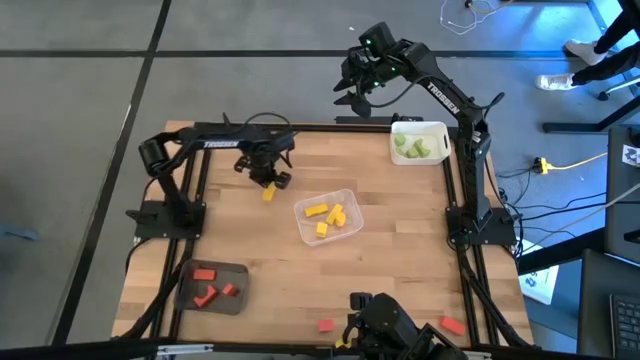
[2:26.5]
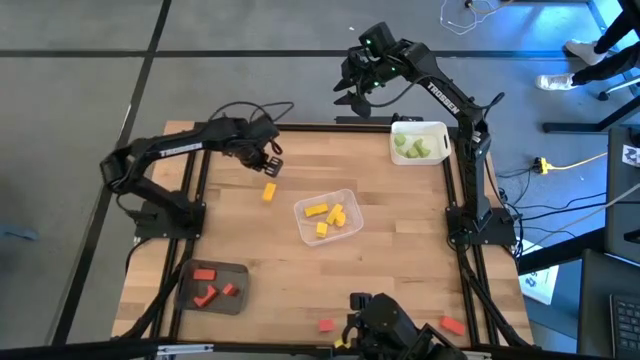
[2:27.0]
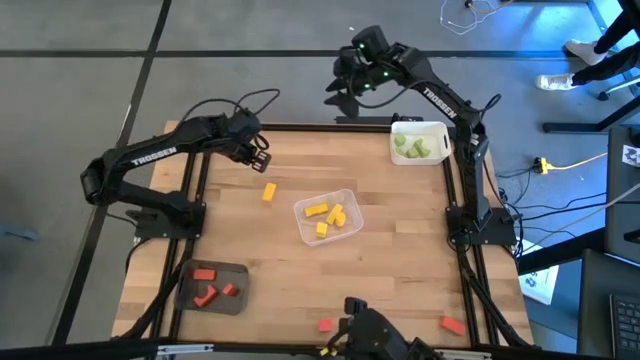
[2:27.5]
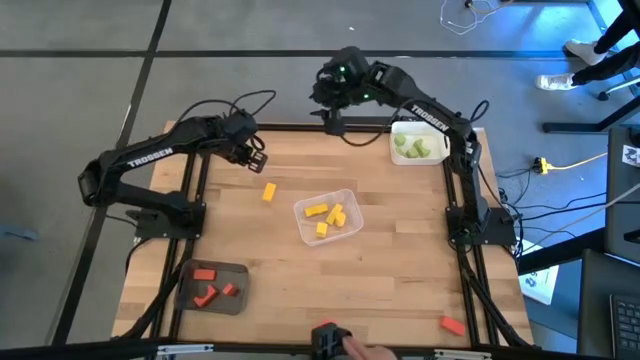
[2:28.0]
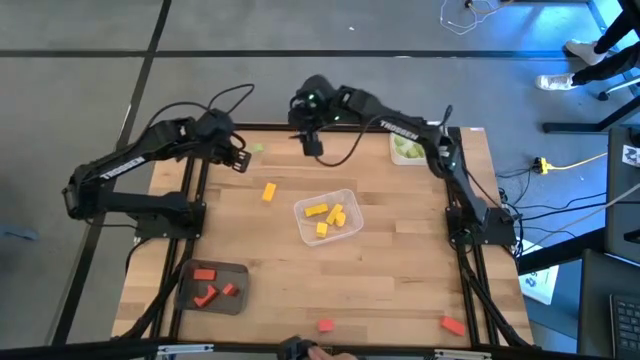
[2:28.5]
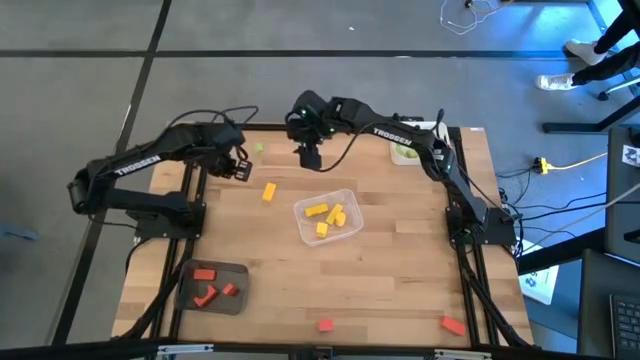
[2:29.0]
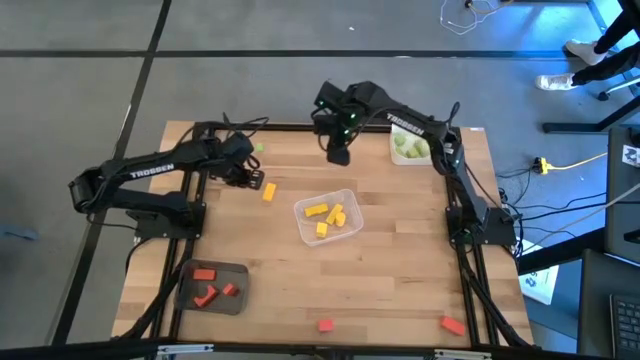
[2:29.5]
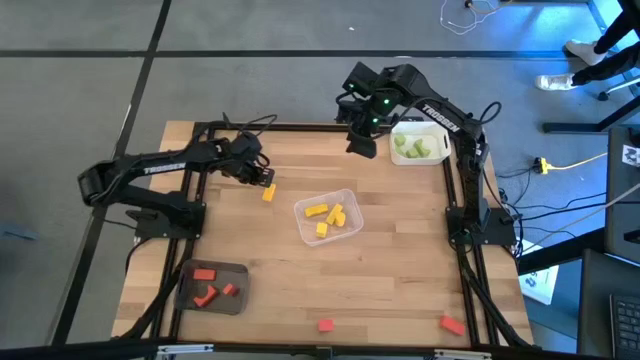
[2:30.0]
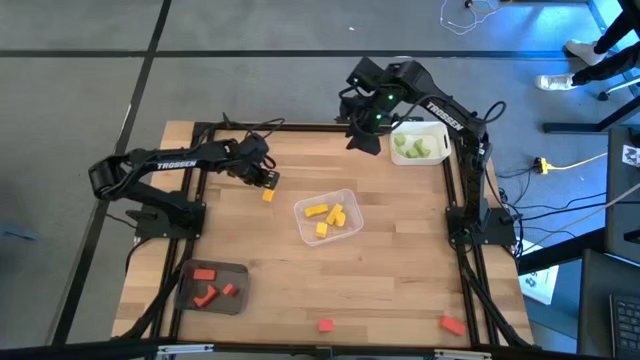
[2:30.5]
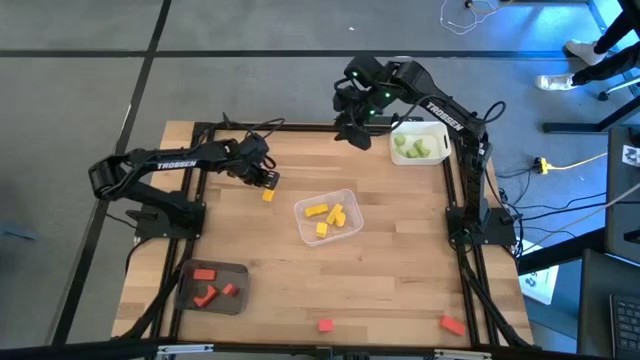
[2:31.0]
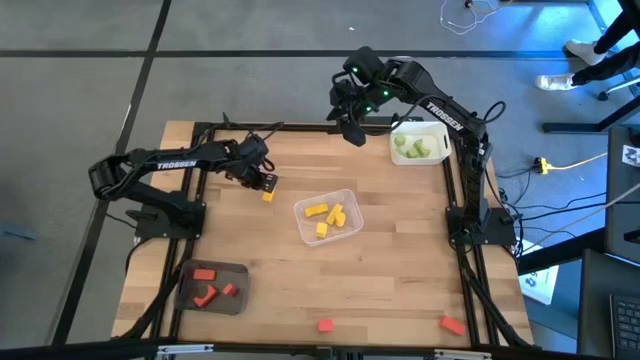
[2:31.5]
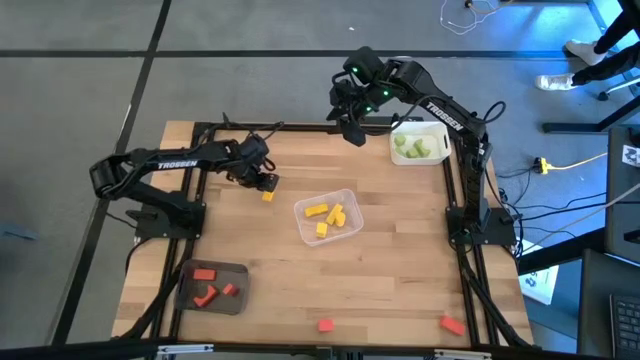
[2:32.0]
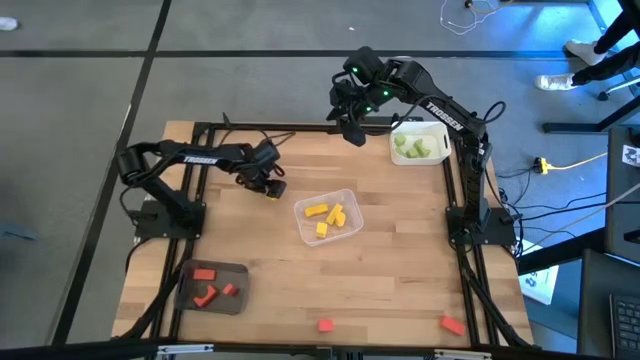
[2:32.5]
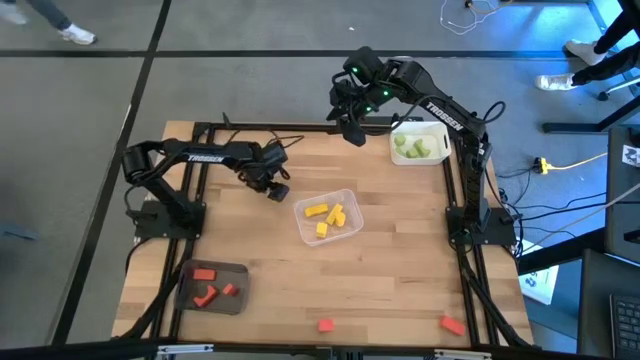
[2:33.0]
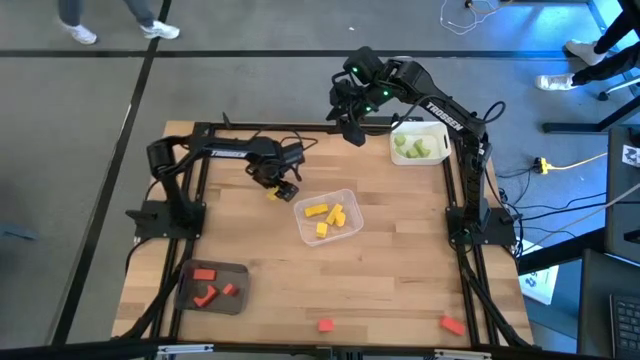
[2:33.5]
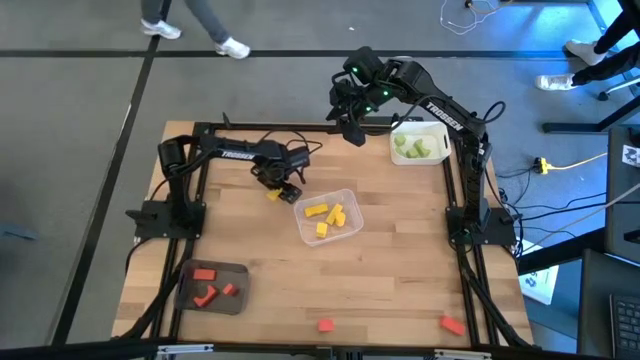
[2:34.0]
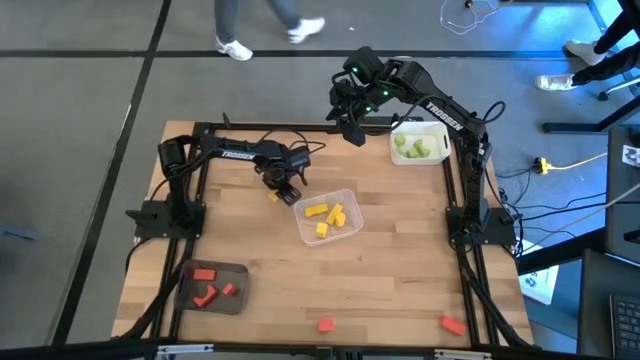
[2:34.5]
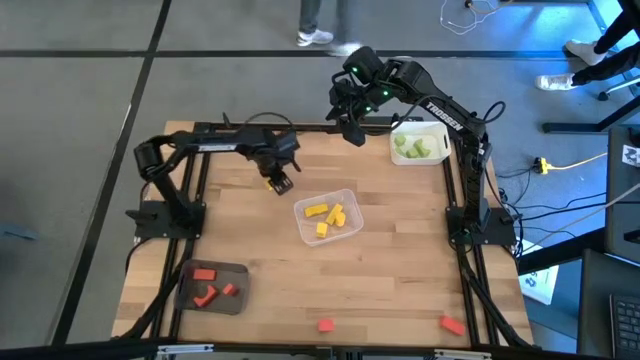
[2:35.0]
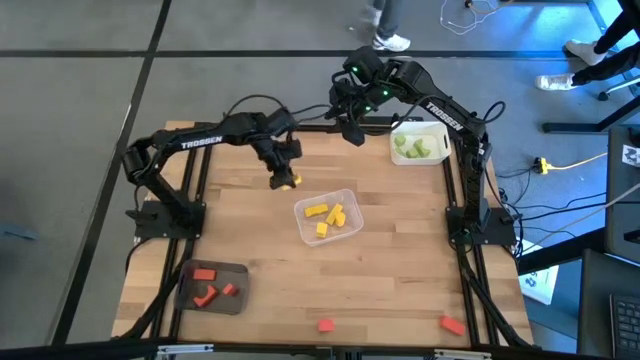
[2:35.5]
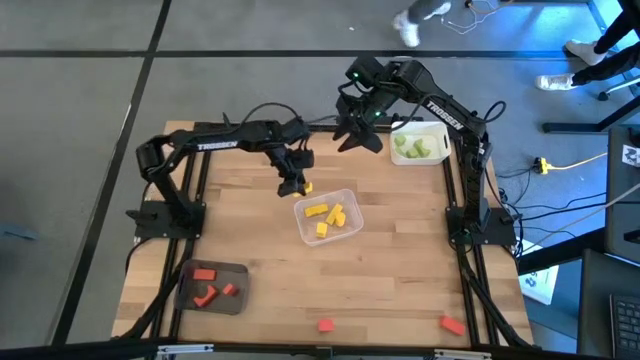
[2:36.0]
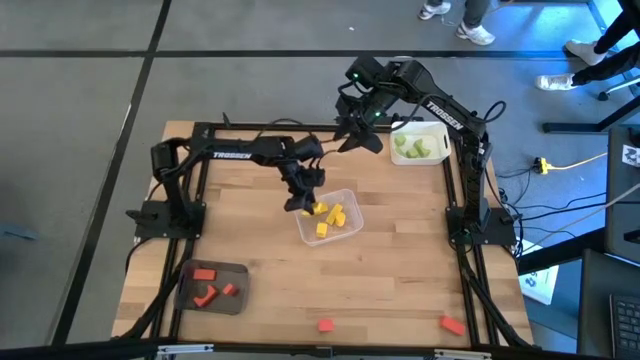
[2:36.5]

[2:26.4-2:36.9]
Task: Sort & place blocks by color
Put the yellow block into the transparent bin

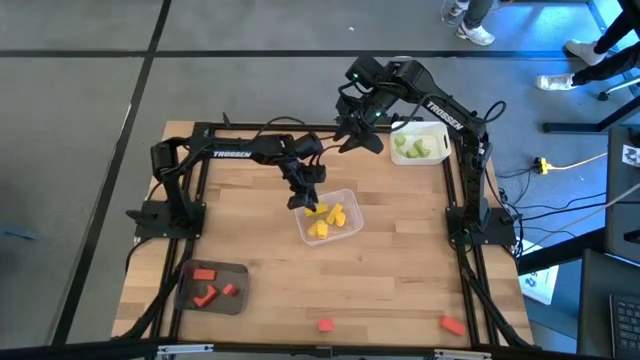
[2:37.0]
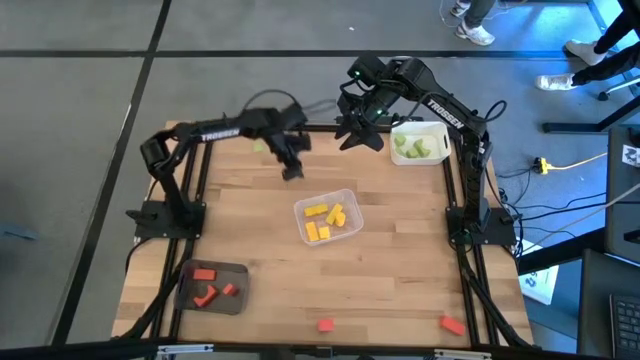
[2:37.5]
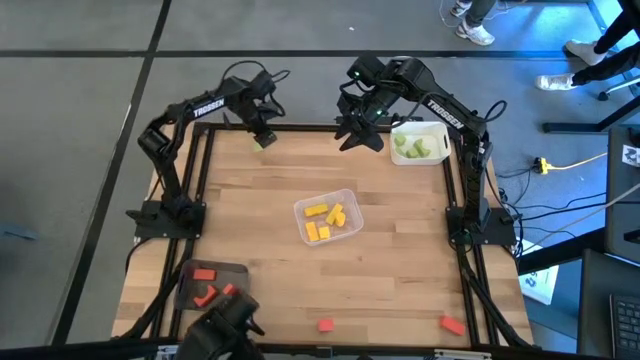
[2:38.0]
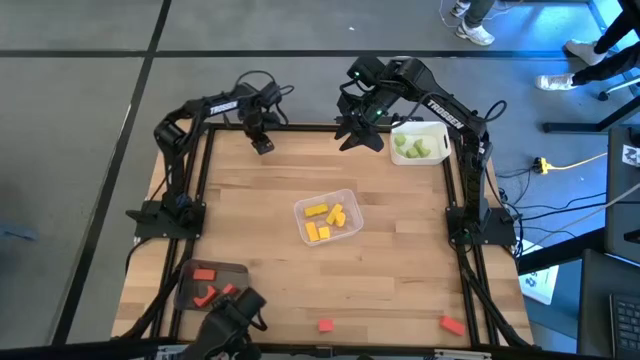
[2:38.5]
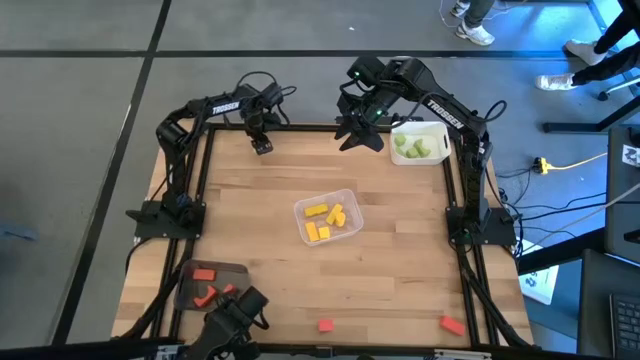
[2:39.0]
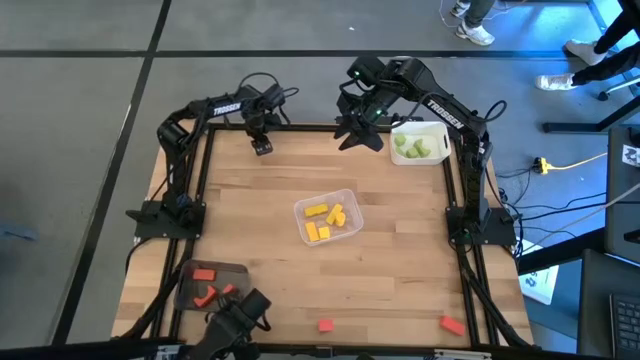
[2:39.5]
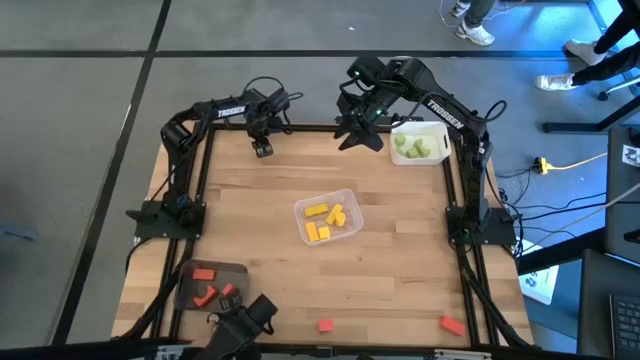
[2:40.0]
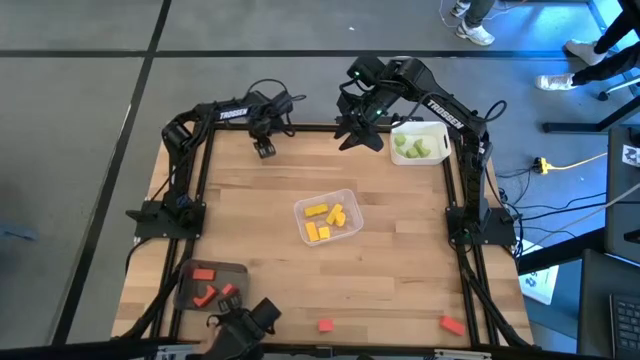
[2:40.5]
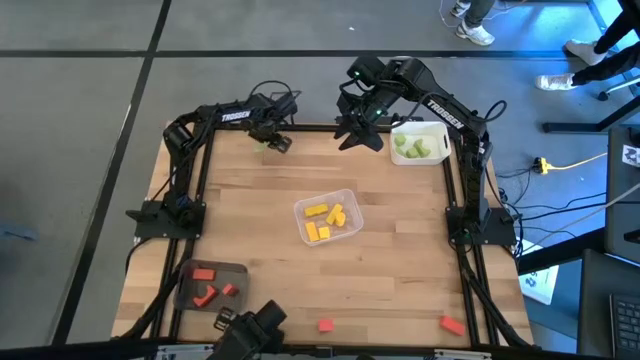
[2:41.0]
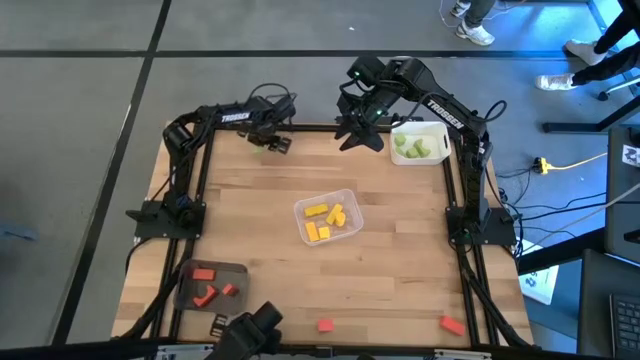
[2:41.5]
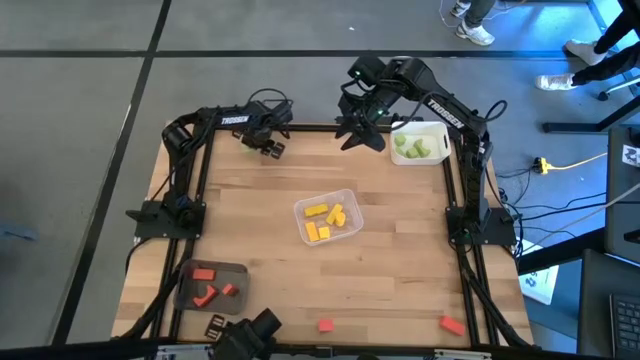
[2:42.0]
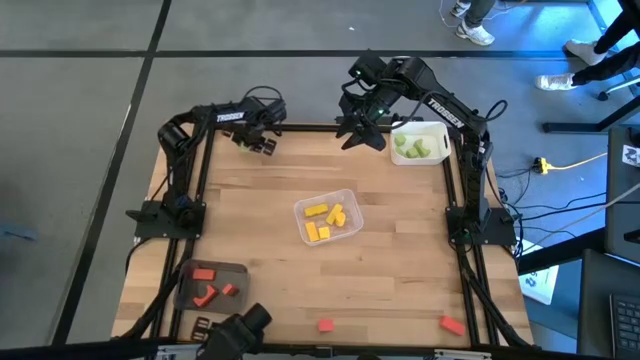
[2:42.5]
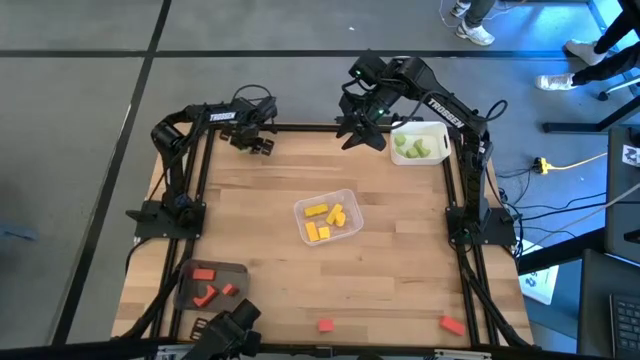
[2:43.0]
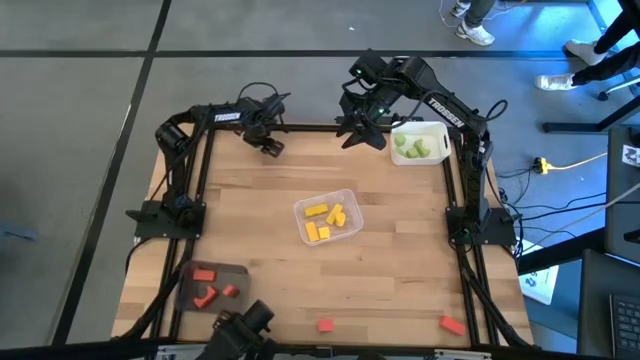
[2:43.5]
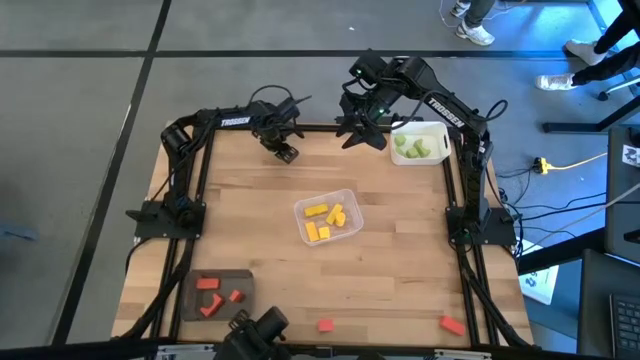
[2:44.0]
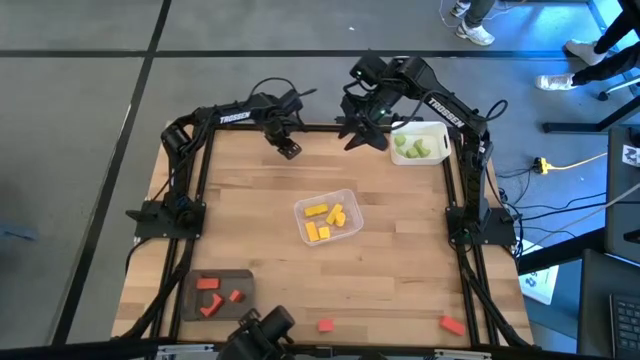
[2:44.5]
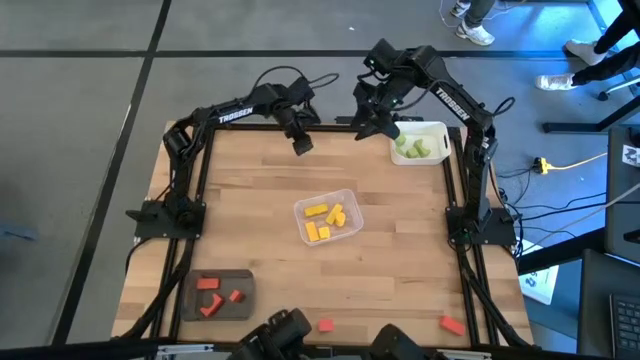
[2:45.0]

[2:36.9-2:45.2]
Put the green block into the white bin
